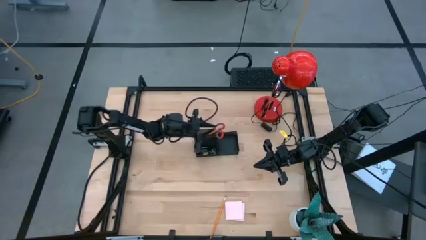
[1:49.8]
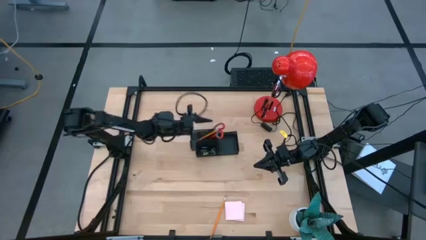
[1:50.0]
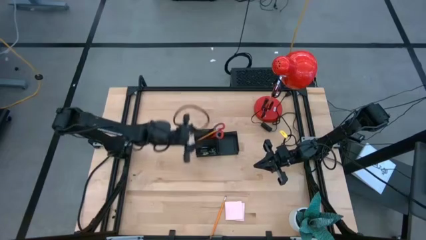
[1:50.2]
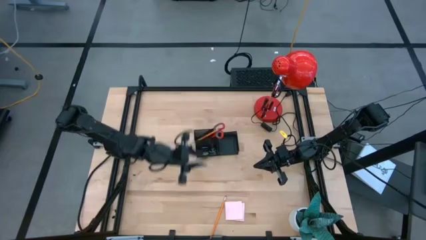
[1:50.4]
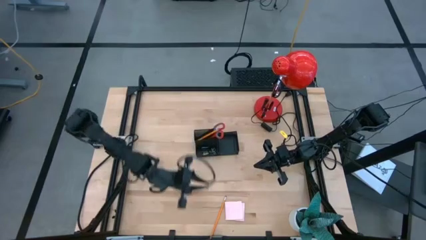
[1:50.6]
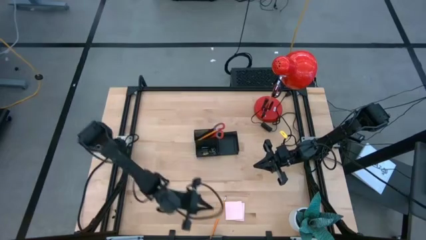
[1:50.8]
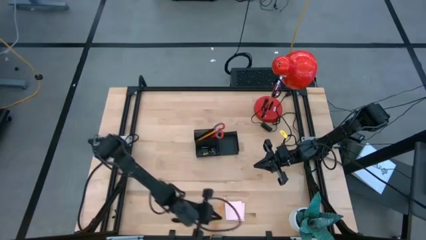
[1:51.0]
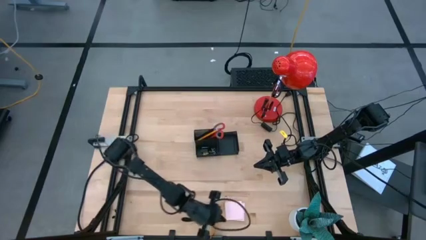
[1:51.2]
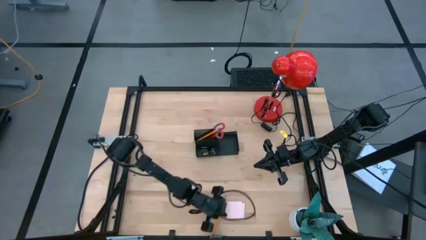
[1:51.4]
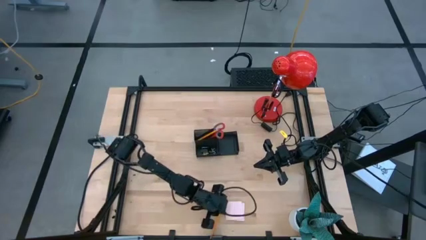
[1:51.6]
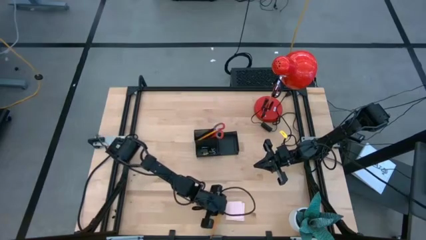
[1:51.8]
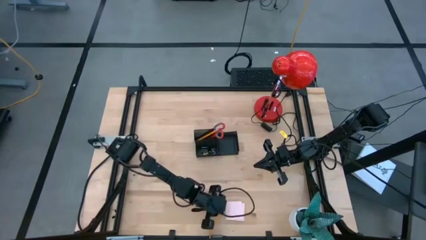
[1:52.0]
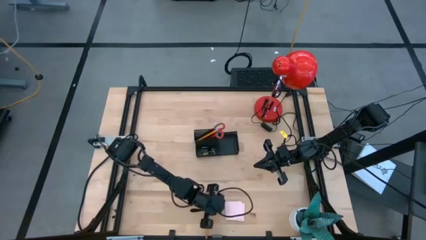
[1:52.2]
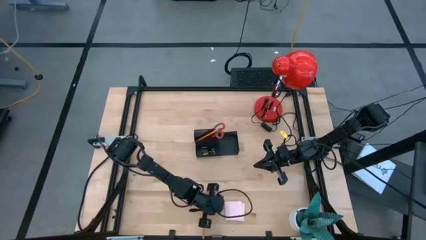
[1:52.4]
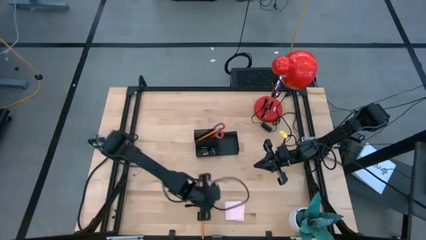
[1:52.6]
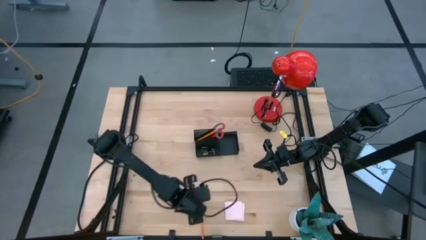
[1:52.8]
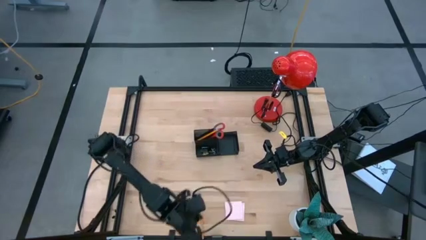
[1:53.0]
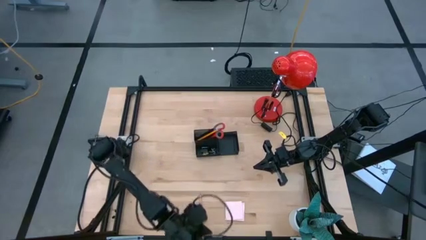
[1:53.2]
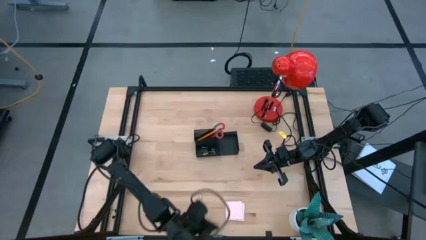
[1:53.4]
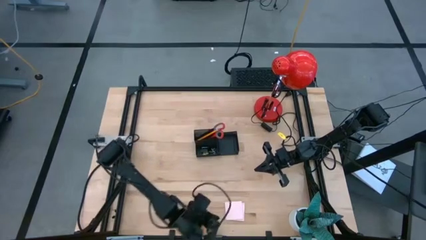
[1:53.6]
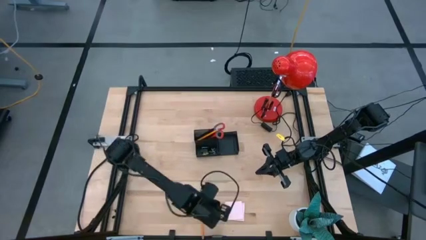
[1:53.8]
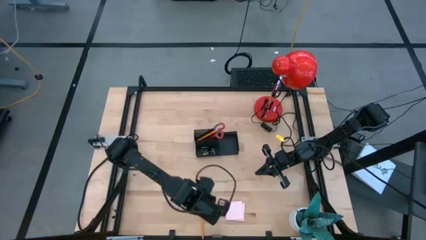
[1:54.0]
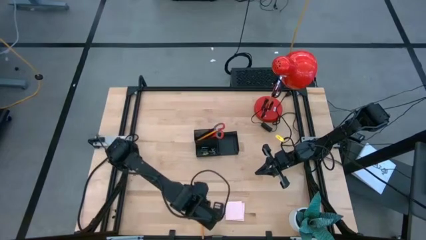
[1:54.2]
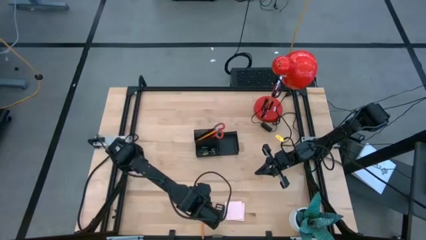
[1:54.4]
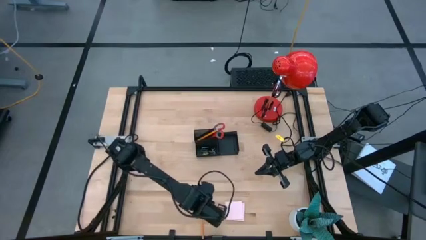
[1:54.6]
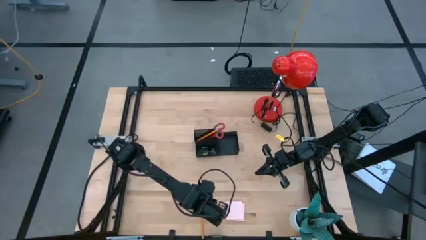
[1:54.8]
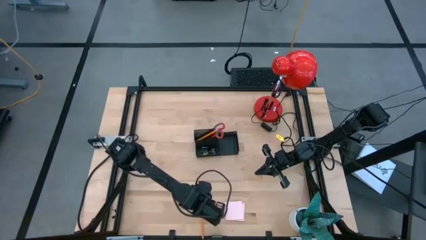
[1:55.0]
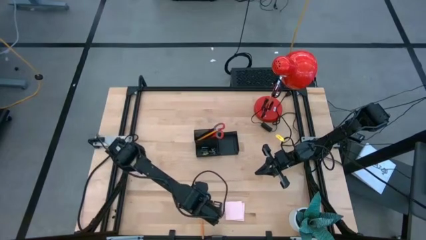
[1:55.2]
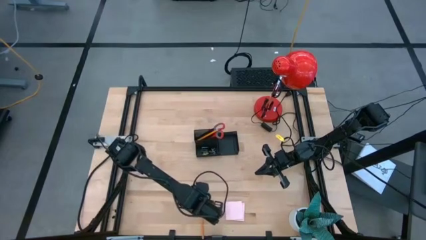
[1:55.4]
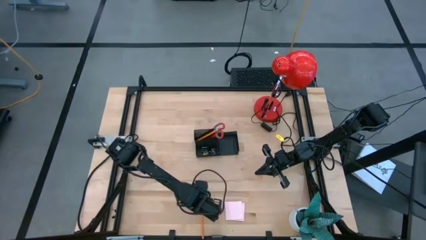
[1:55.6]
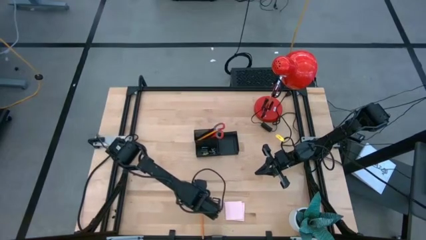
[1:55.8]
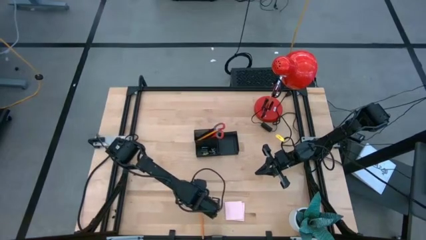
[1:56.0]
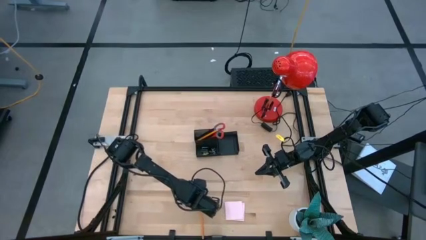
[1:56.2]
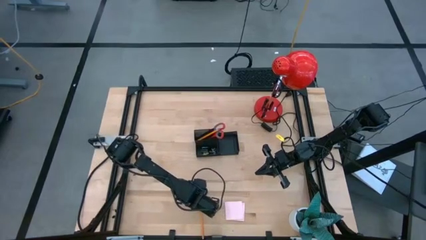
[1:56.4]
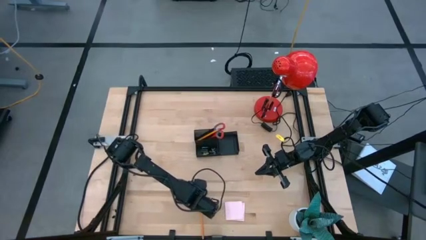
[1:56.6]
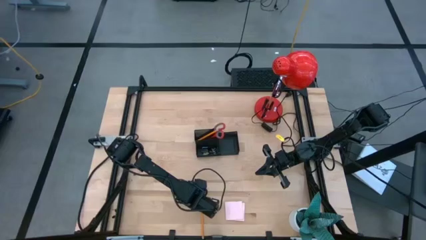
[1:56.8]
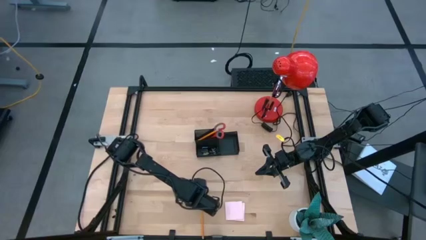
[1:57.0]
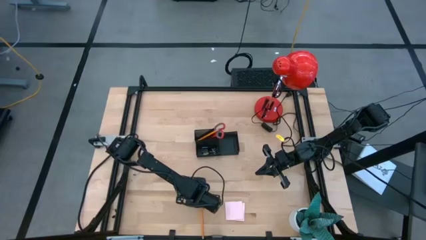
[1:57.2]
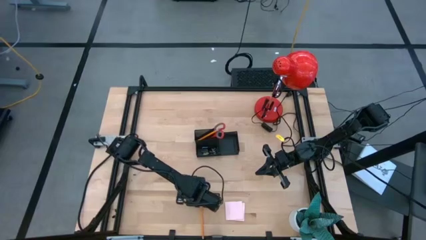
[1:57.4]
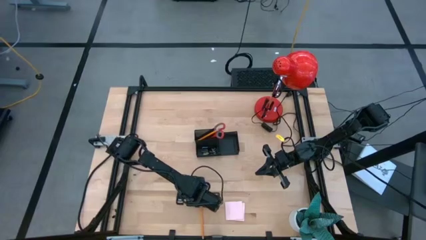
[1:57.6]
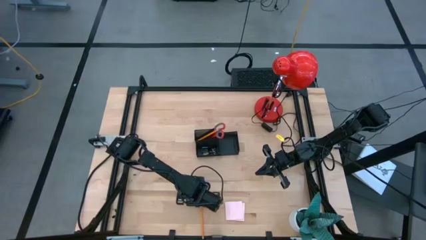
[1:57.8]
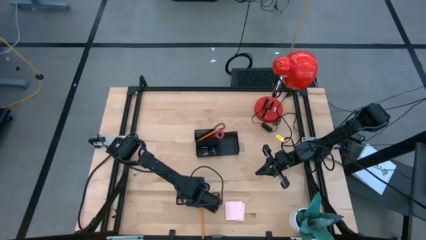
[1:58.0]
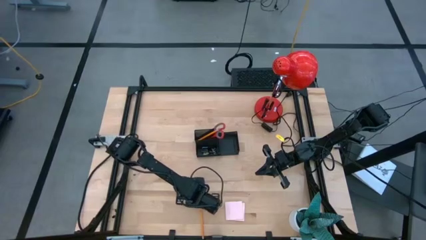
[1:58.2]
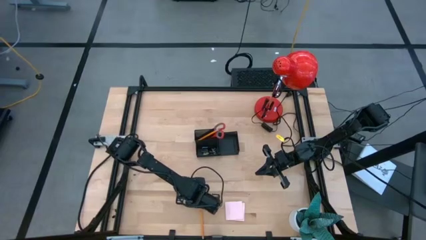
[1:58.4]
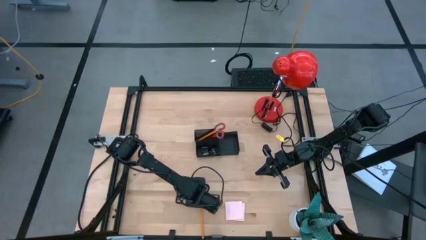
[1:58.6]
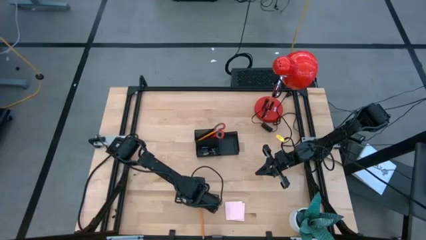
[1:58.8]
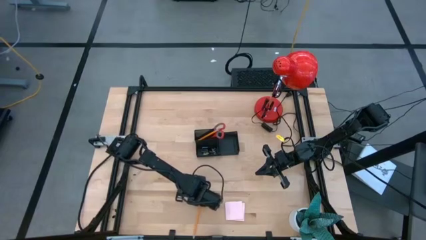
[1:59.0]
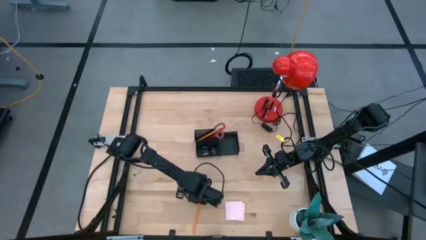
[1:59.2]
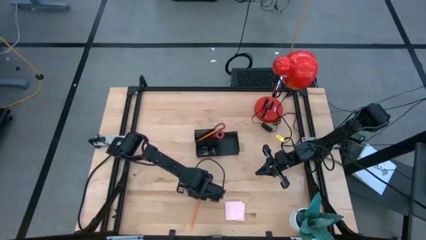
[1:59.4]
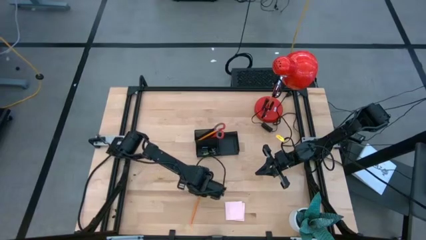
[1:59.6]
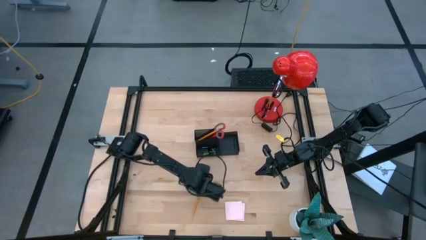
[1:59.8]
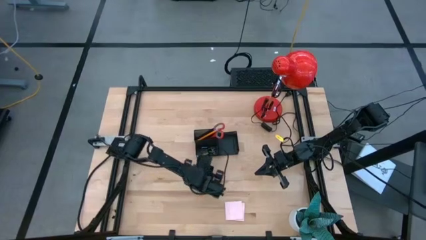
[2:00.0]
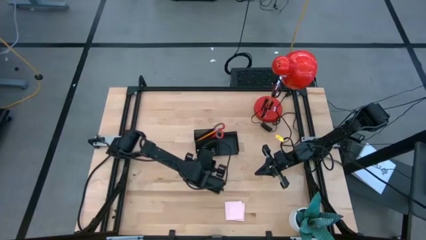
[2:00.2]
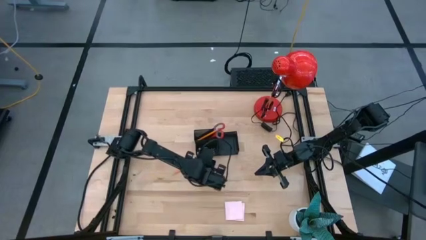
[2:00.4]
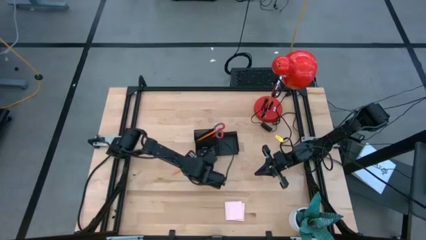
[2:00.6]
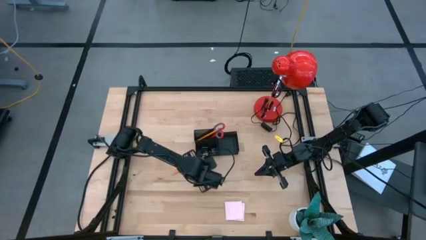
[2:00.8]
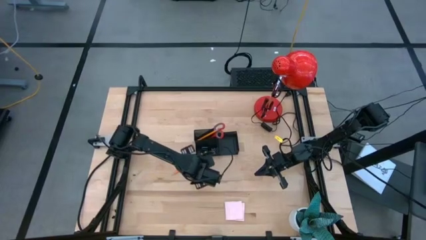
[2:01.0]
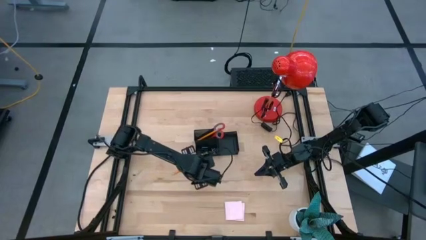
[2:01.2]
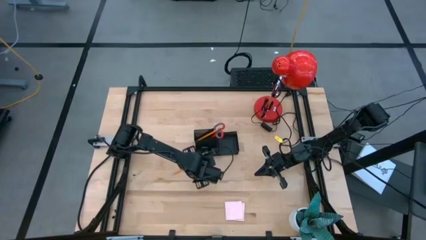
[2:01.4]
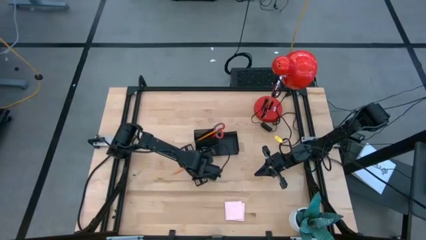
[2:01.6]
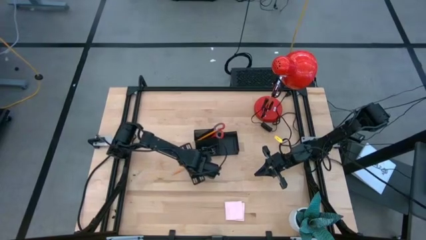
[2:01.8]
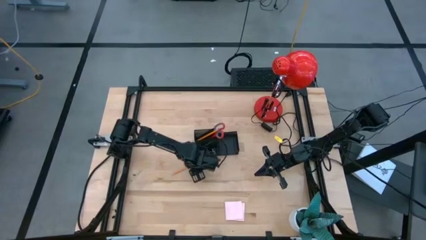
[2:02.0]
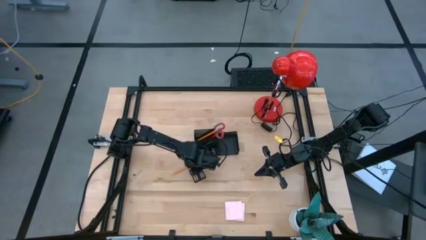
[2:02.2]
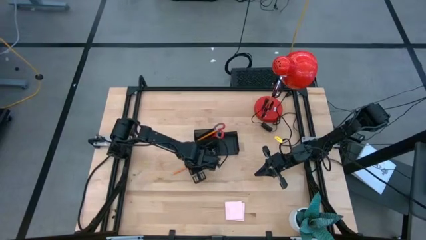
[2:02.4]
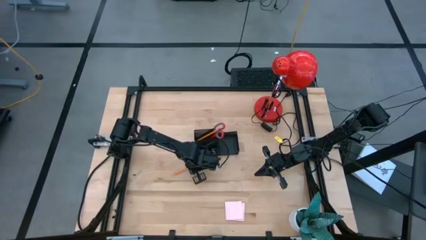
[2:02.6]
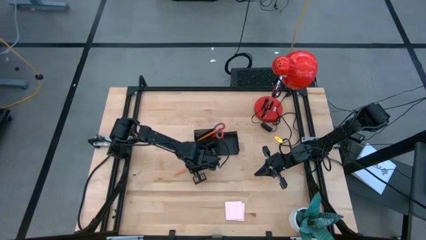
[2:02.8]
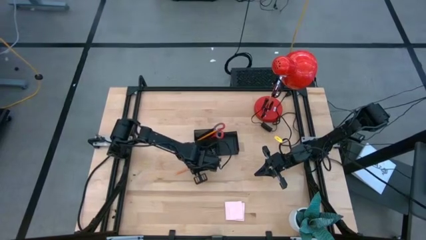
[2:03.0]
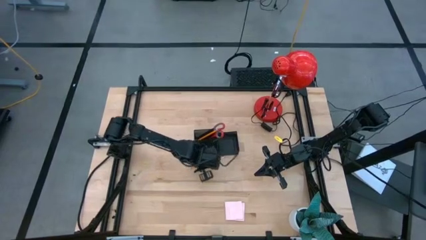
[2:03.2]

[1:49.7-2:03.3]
Task: Pick and place office supplies into organizer
Put the pencil into the desk organizer
